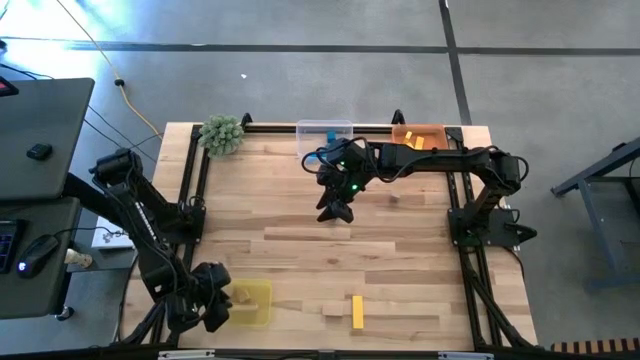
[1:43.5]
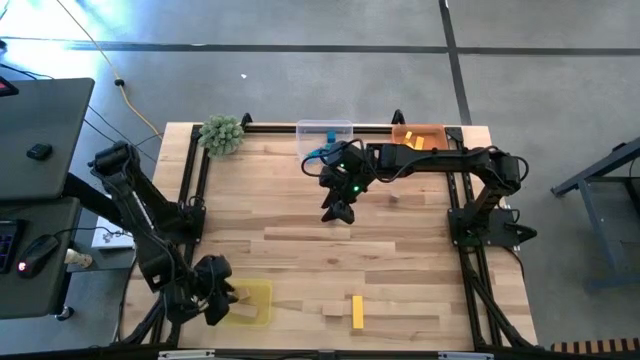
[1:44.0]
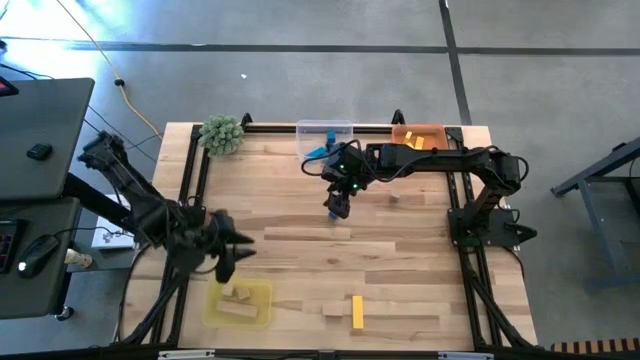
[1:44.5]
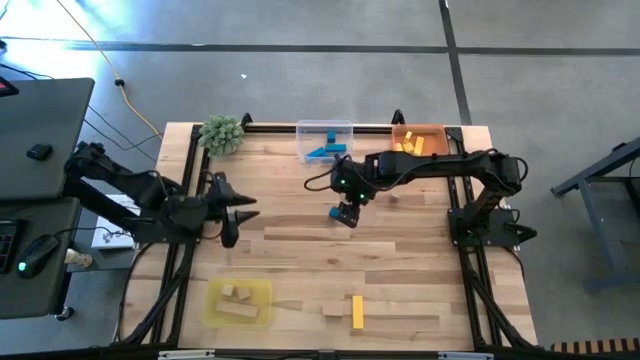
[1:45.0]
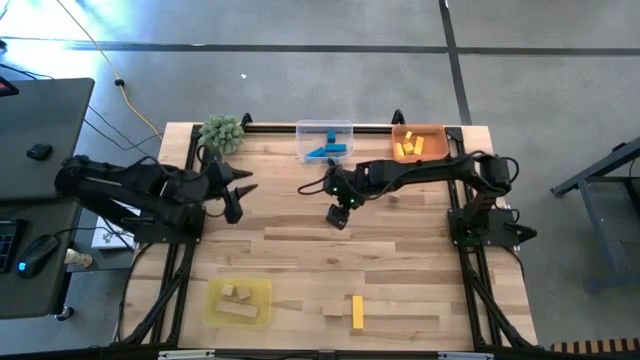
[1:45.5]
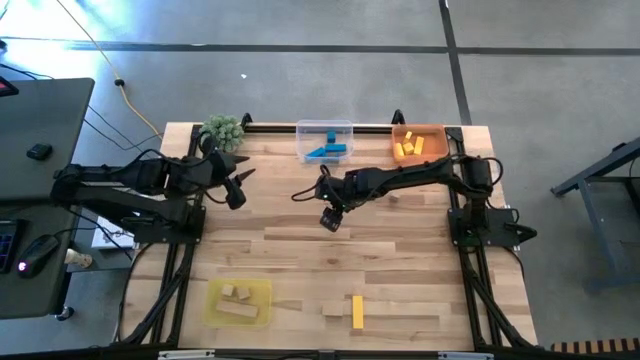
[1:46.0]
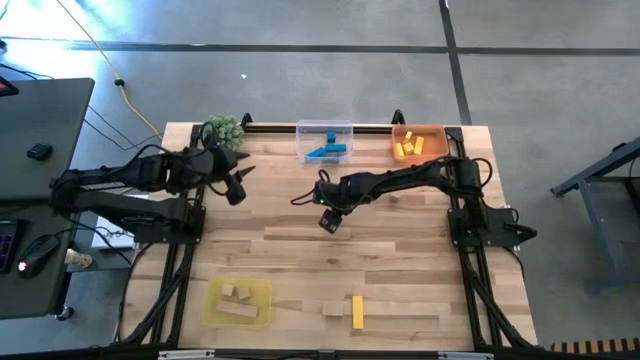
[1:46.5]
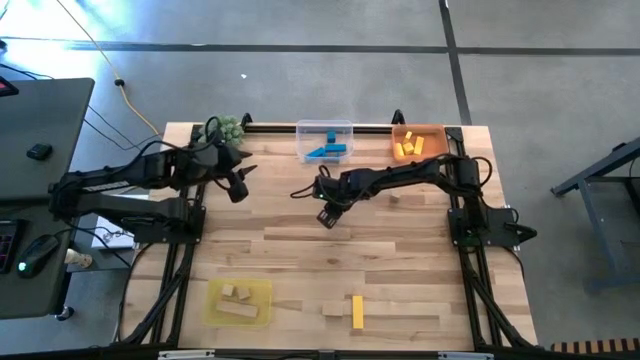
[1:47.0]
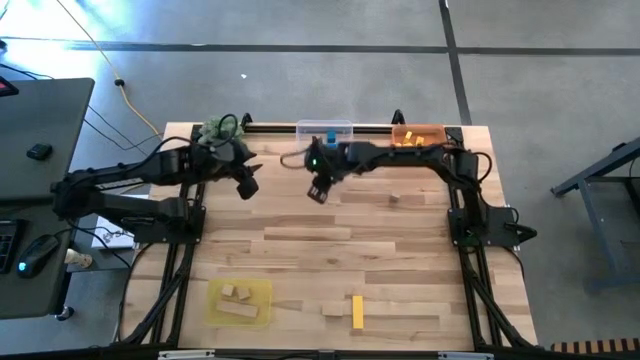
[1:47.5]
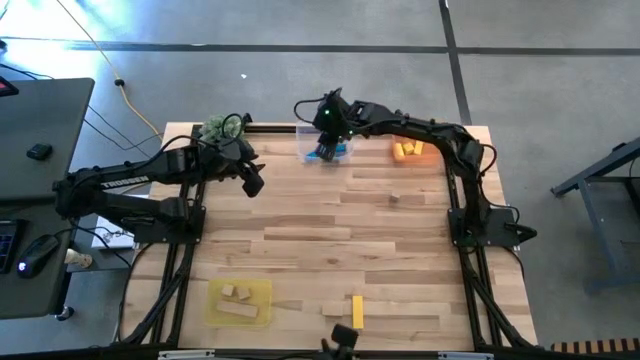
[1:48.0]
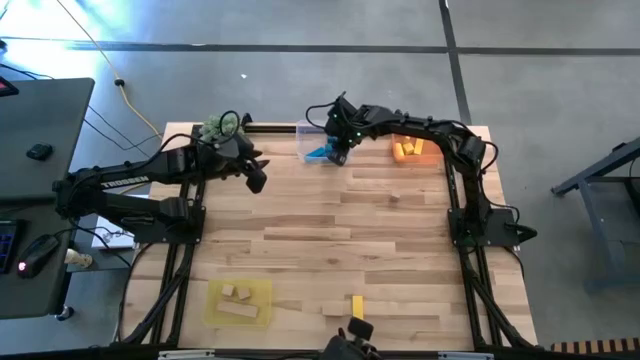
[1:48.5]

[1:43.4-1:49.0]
Task: Sort & place blocks by color
Put the blue block into the transparent bin

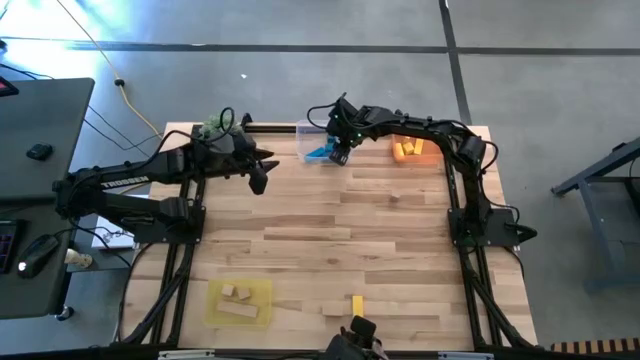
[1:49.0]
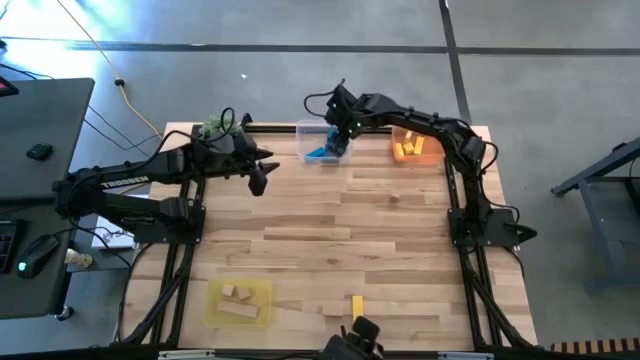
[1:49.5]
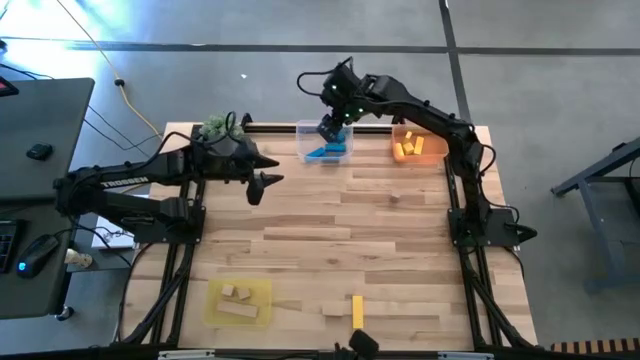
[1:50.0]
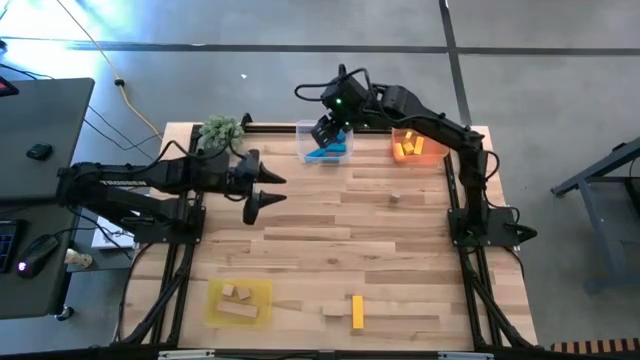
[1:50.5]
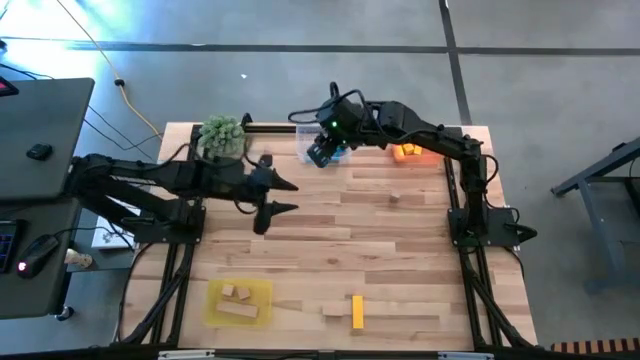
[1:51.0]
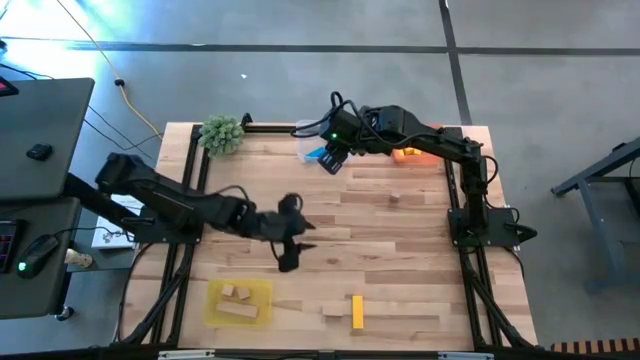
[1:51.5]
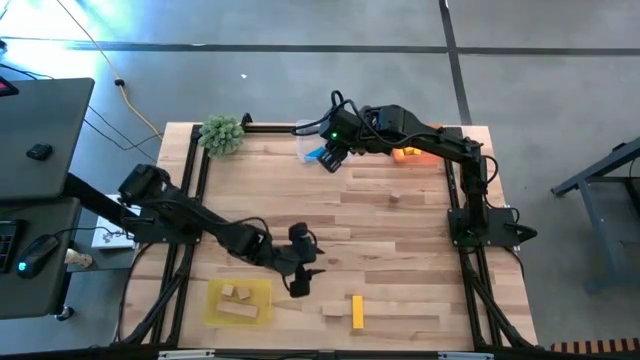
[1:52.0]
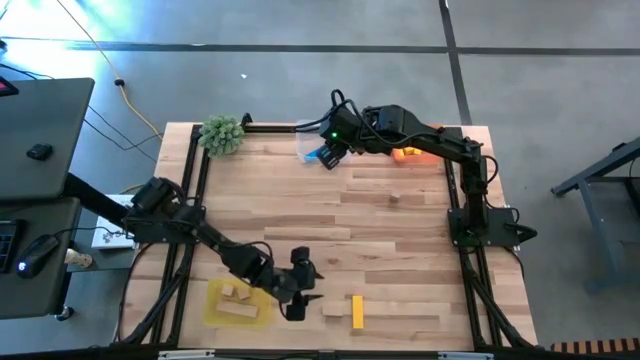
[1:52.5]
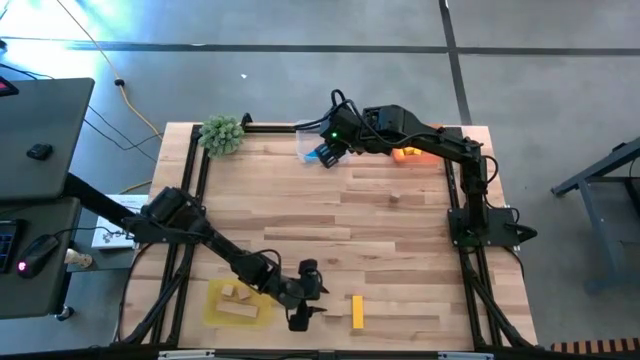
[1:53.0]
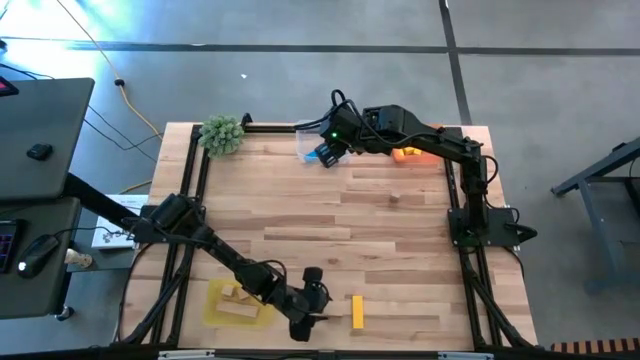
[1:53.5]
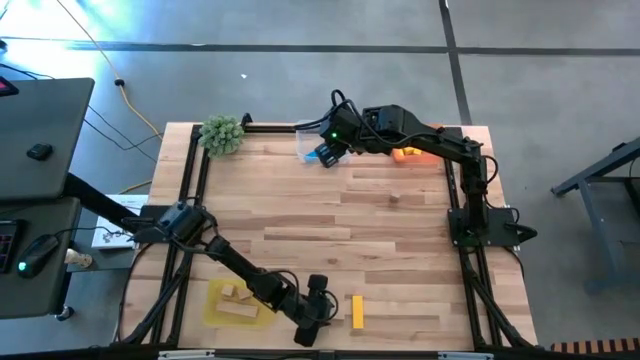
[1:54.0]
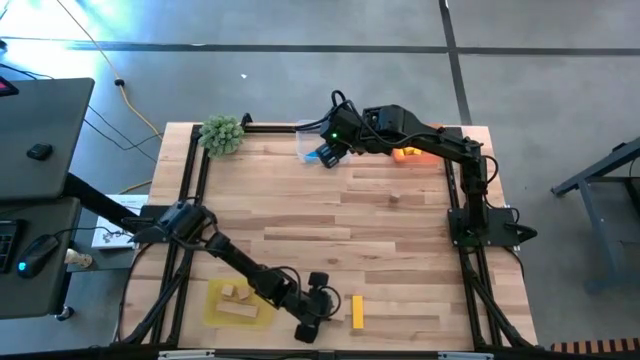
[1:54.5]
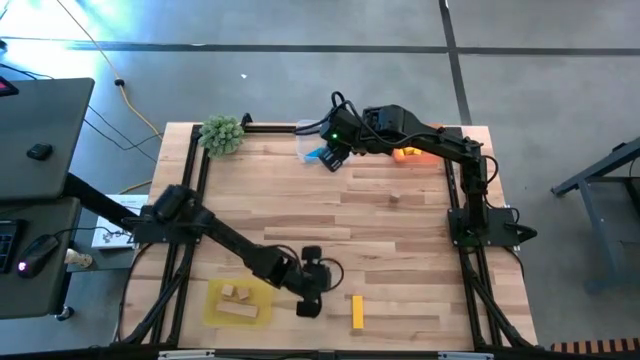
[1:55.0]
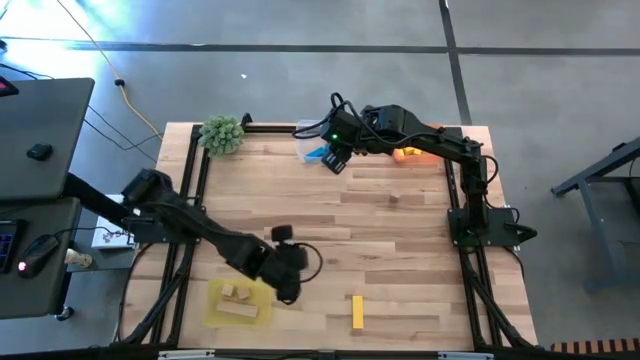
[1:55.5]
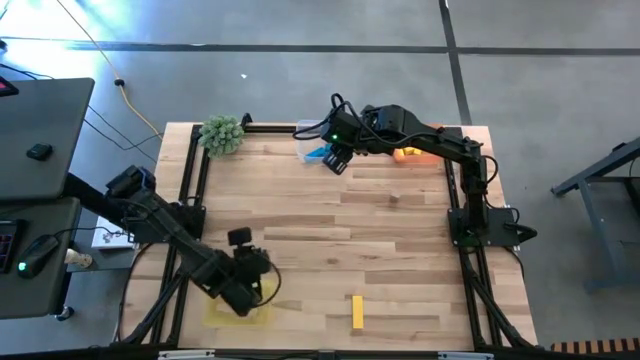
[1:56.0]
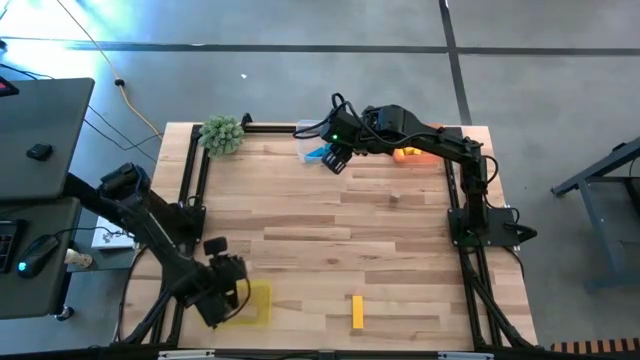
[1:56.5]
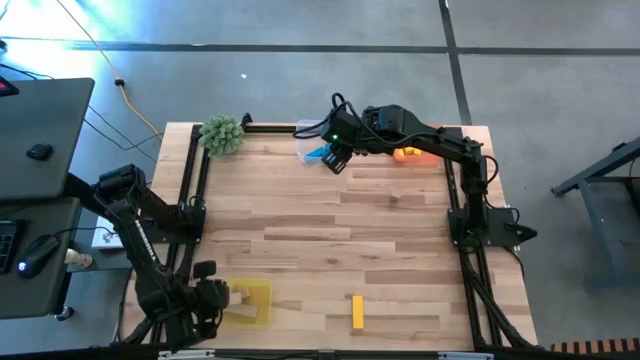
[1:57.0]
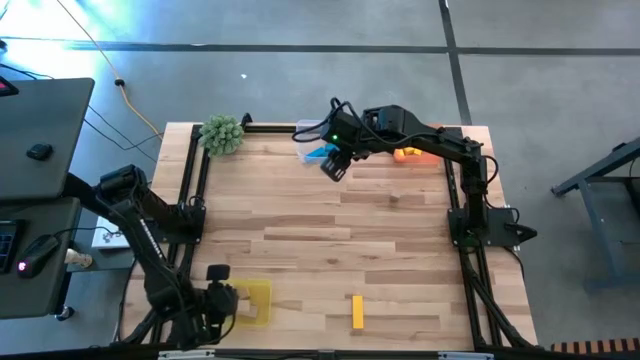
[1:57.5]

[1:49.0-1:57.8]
Put the brown block into the yellow bin

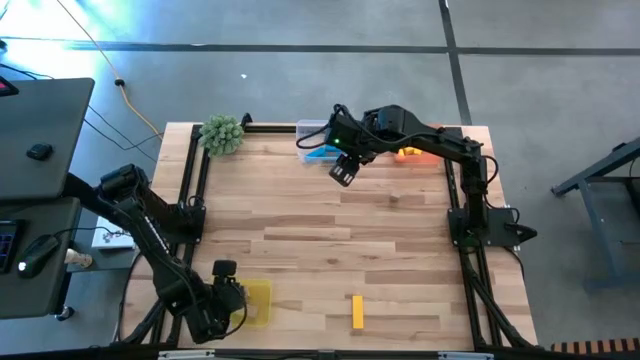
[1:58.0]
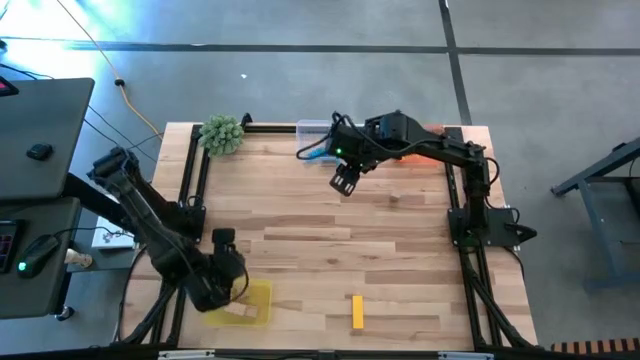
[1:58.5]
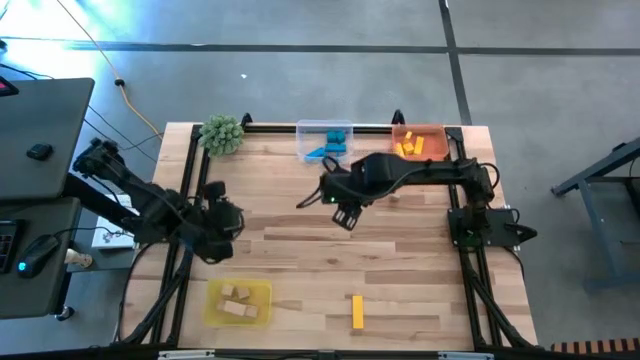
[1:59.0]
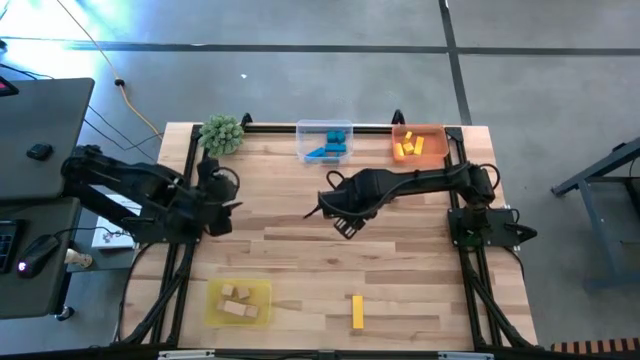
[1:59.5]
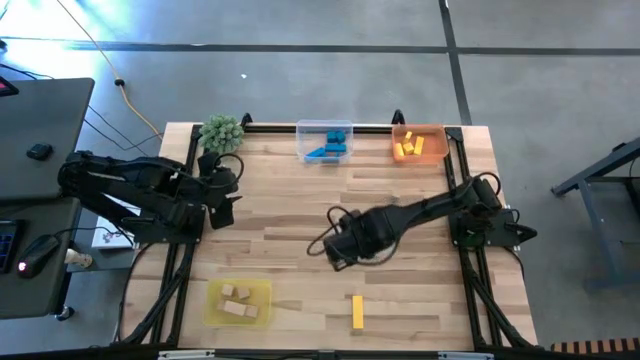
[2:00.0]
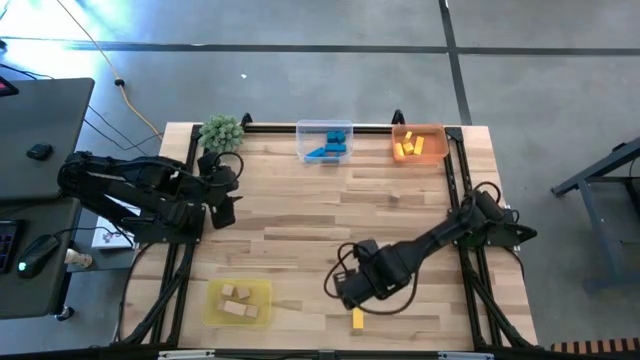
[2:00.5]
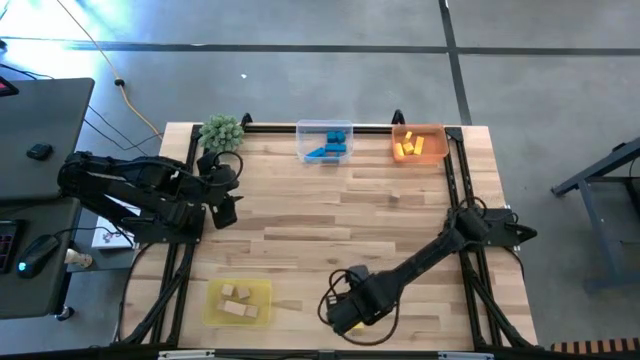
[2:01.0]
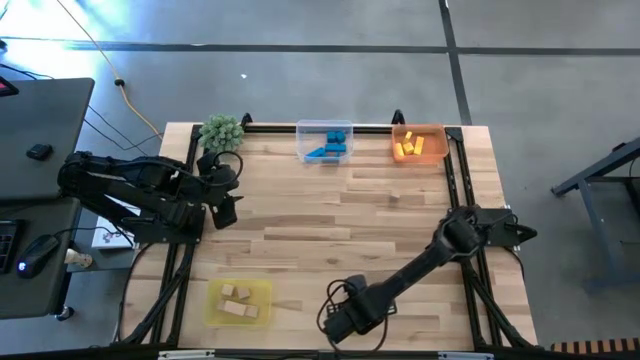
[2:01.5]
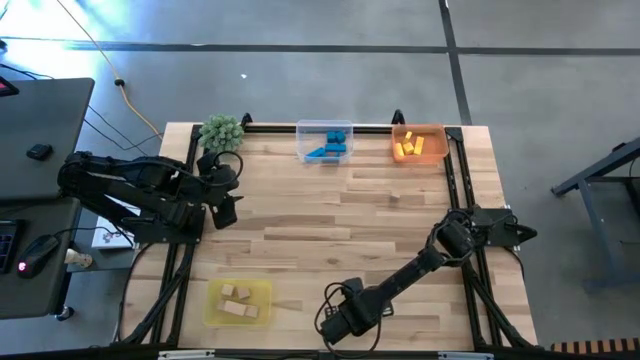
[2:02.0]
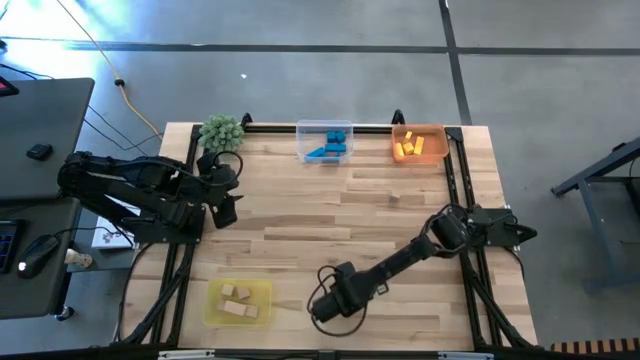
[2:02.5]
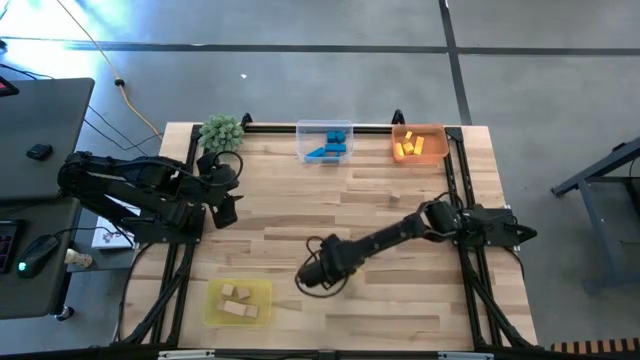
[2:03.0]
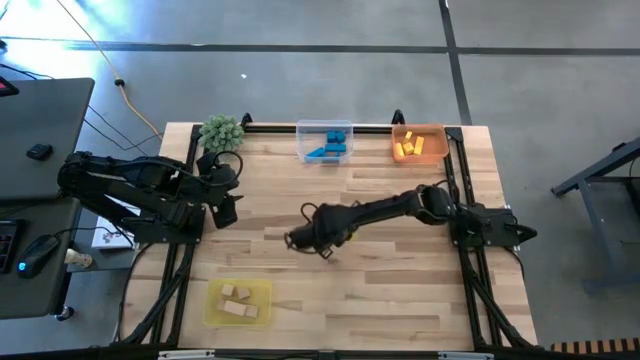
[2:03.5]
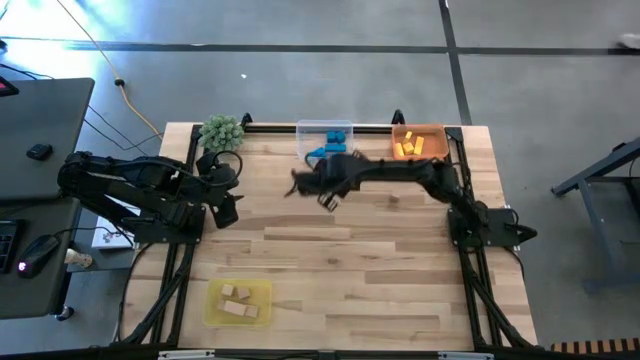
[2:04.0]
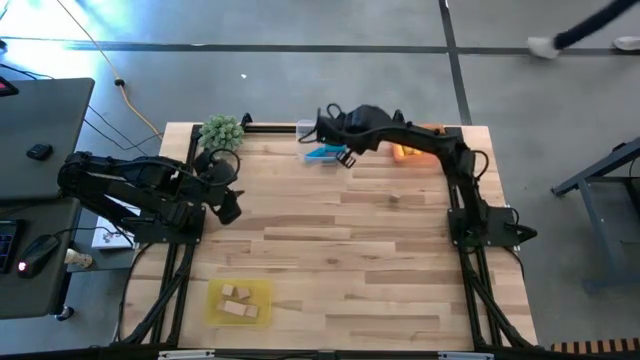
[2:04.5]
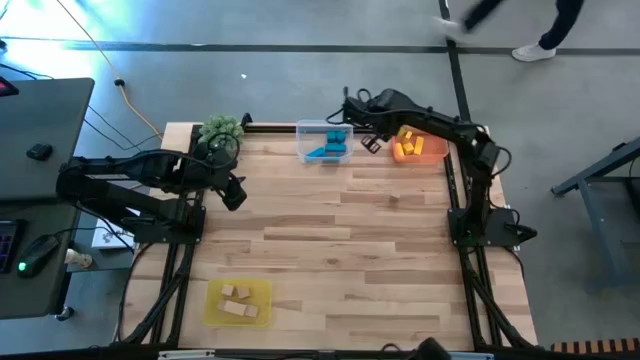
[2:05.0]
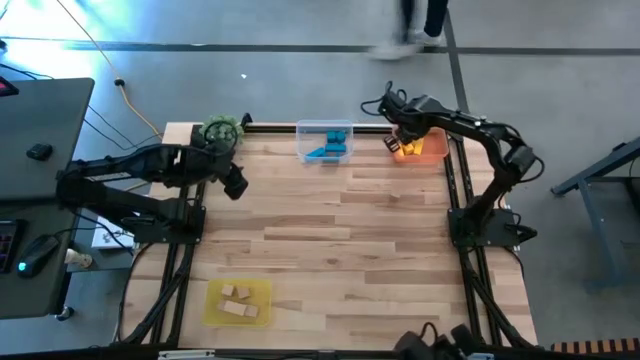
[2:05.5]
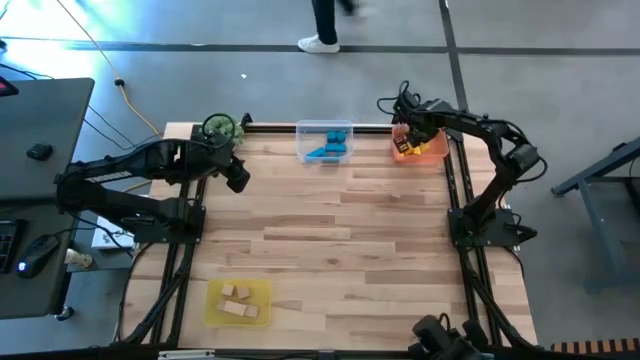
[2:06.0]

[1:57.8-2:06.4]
Put the yellow block into the orange bin
